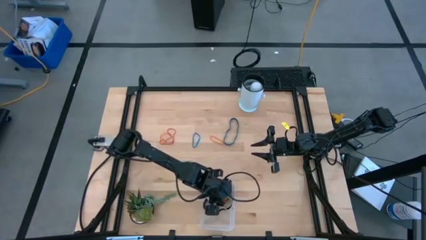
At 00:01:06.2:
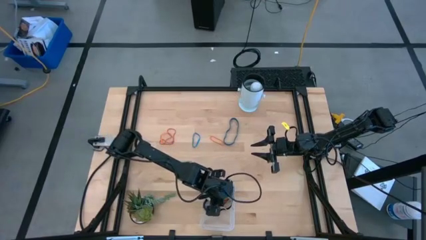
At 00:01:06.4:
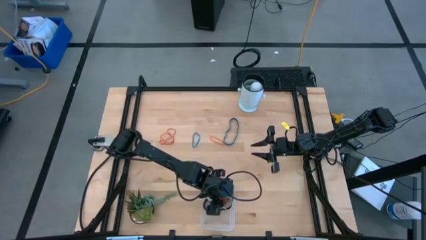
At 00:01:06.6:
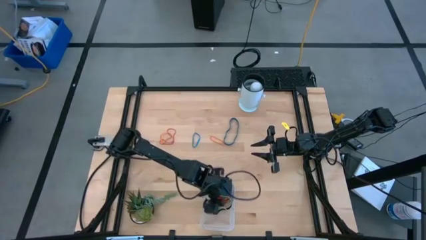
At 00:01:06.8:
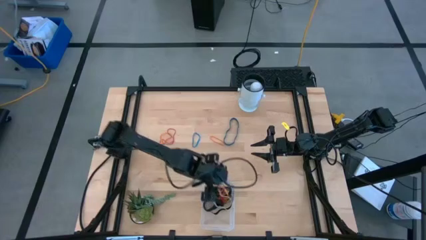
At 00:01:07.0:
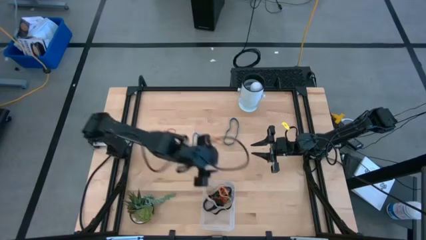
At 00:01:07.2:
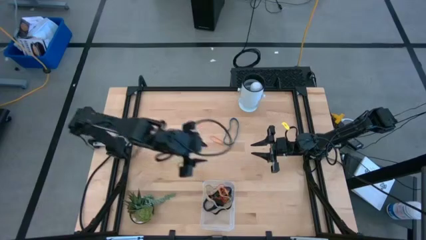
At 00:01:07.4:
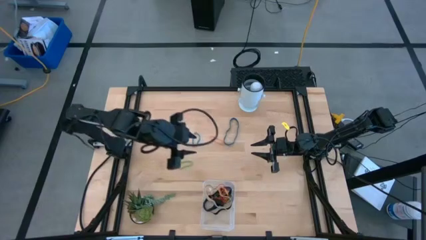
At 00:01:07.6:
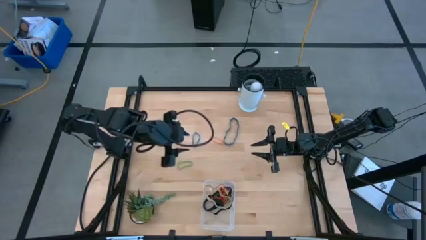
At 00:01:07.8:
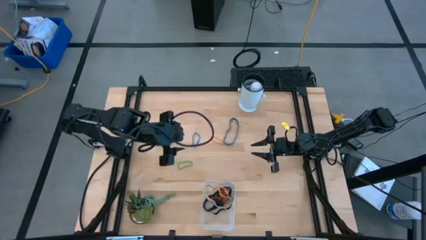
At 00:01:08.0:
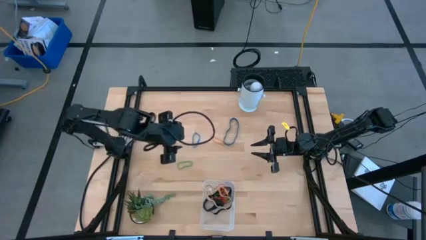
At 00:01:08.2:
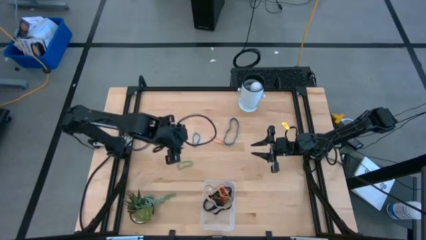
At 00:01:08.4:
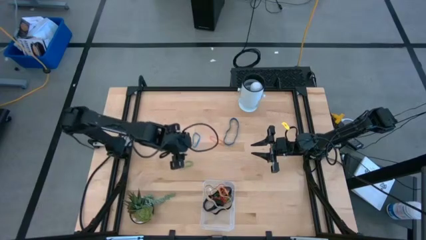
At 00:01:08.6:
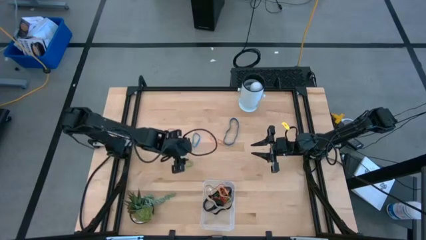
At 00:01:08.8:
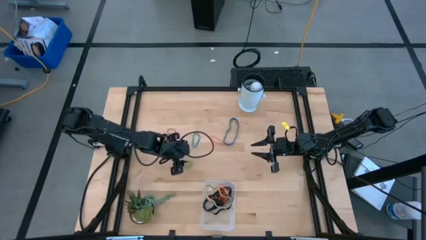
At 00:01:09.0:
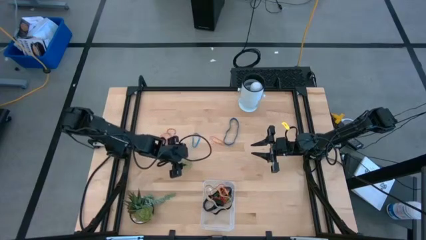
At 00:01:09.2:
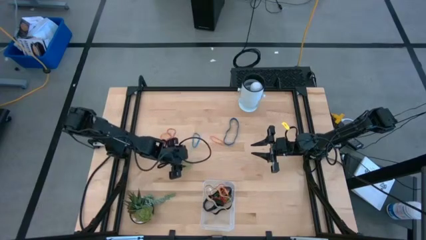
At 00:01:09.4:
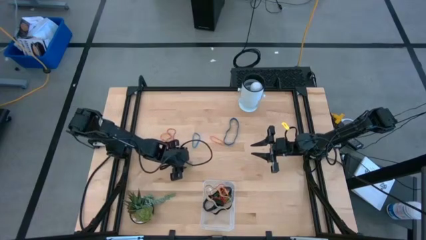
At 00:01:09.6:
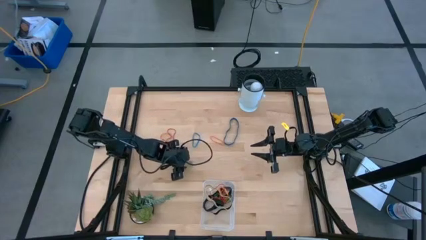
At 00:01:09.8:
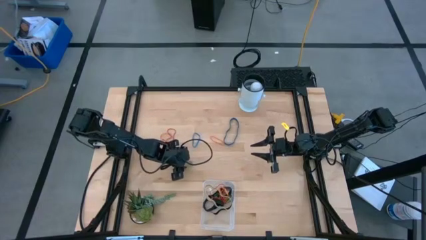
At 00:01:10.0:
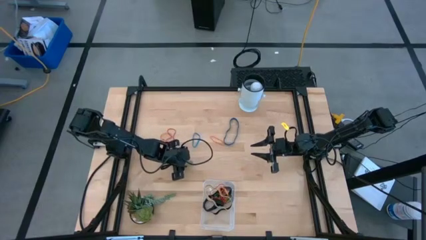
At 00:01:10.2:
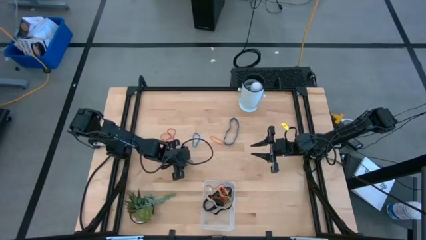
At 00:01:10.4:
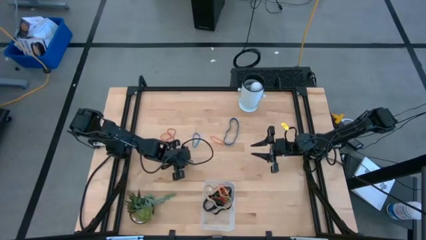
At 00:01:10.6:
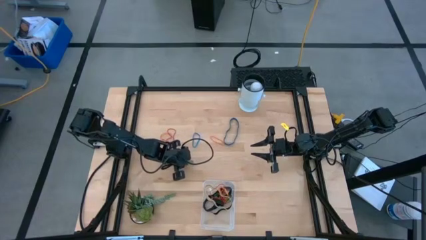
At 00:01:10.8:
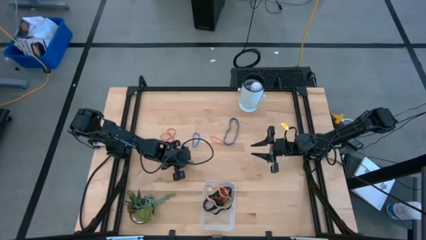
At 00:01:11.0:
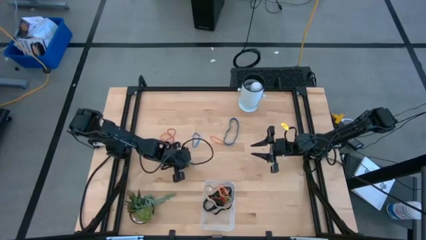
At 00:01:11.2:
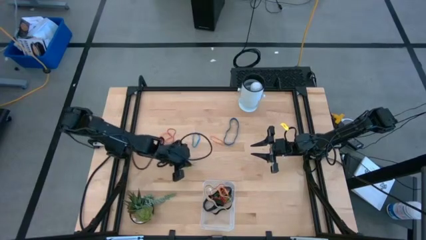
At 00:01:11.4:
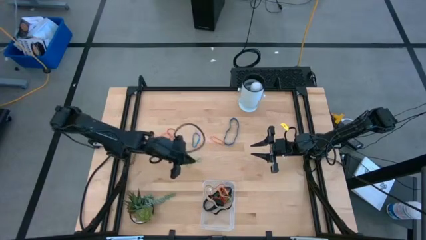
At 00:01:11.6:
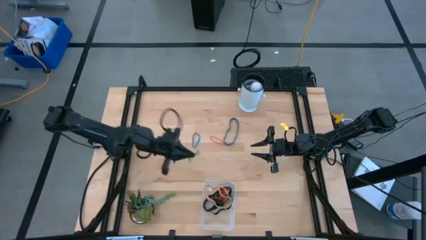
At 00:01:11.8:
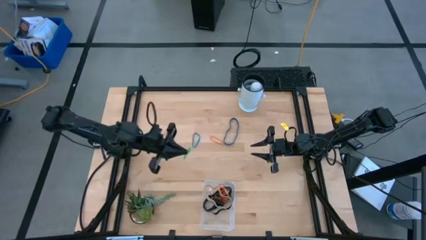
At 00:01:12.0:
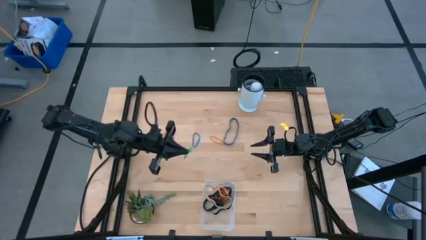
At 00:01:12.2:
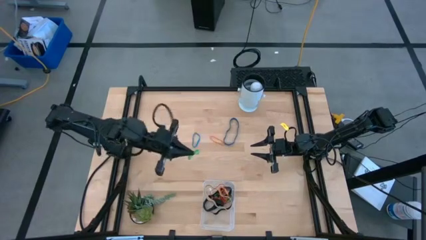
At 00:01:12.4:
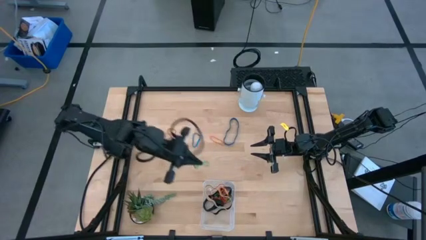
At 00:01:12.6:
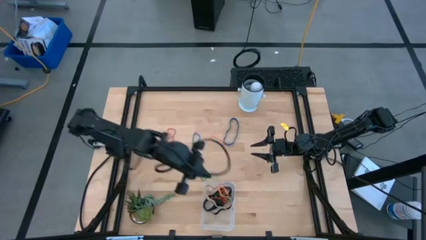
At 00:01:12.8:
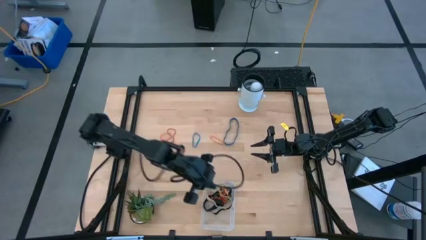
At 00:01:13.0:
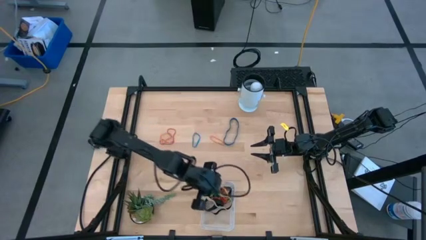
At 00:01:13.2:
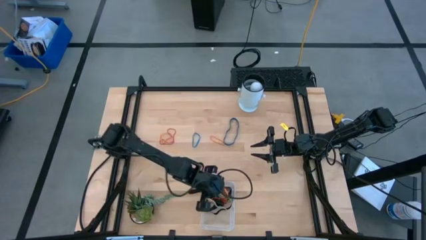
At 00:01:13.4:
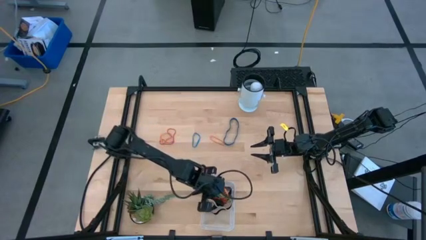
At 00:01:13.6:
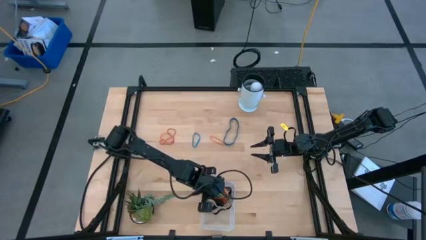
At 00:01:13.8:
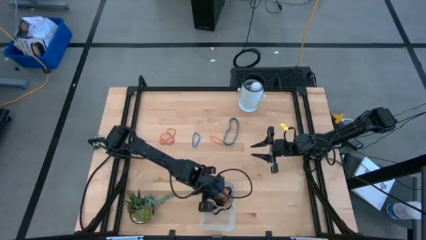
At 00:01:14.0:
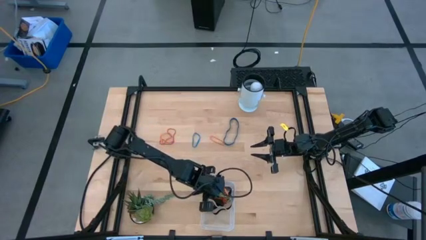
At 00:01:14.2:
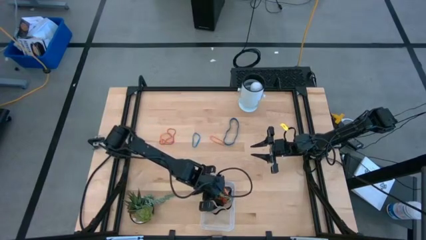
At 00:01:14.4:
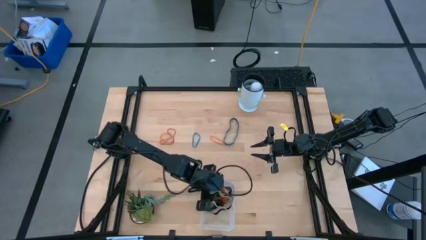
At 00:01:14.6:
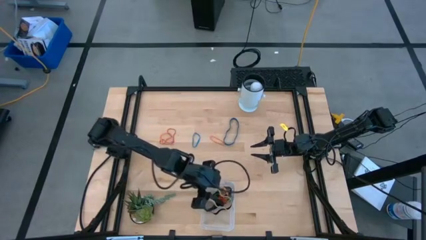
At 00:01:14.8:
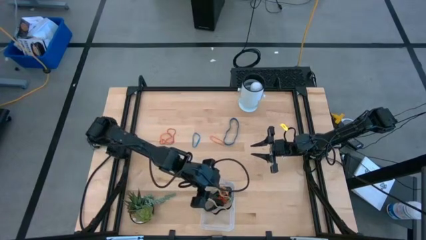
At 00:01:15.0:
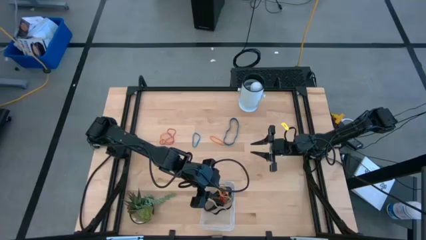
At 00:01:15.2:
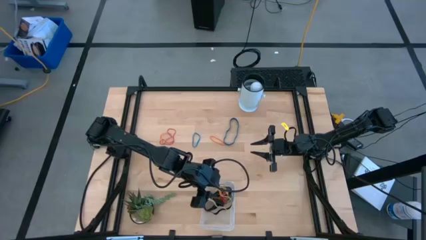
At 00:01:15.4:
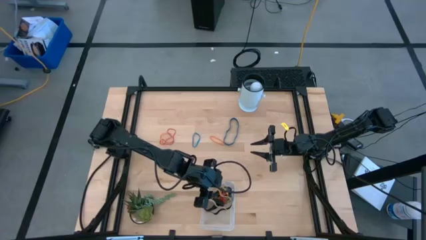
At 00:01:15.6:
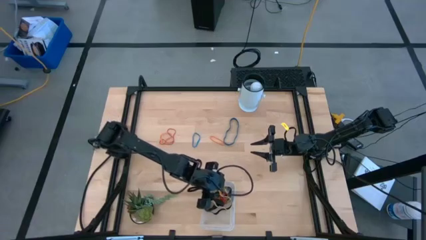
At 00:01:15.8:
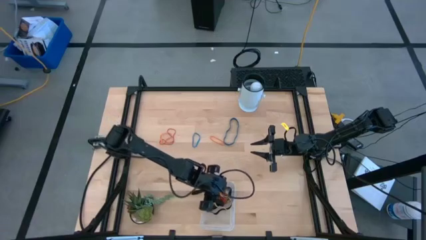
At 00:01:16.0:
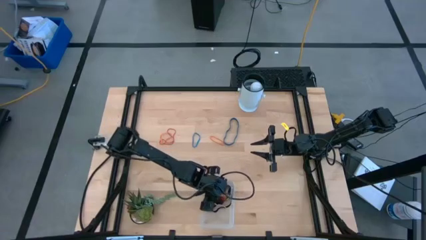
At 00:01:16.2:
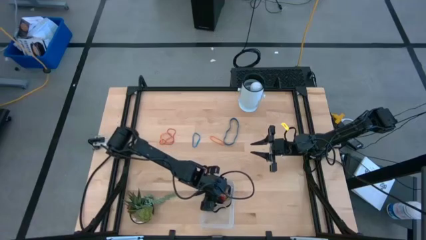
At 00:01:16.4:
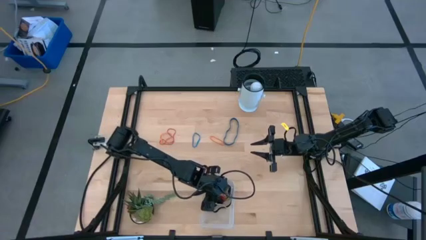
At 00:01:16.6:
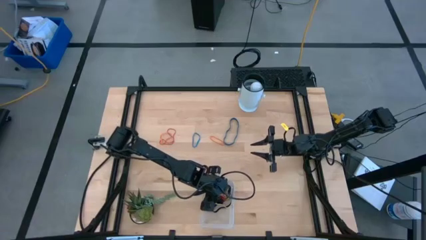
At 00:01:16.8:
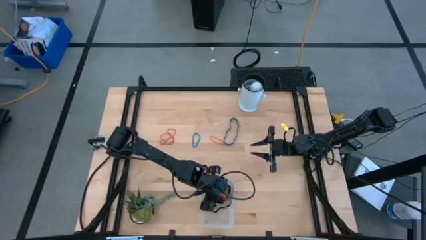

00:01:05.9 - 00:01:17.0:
Task: Pick and place rubber bands into bin
Put the green rubber band into the transparent bin

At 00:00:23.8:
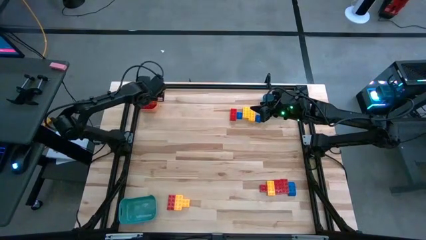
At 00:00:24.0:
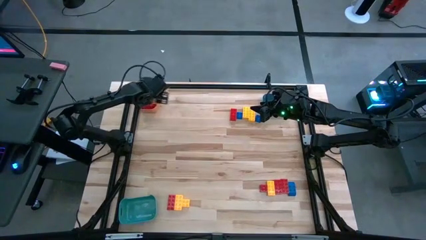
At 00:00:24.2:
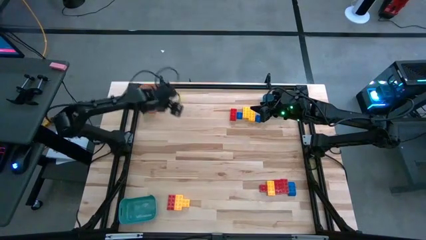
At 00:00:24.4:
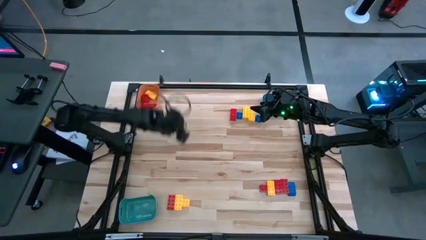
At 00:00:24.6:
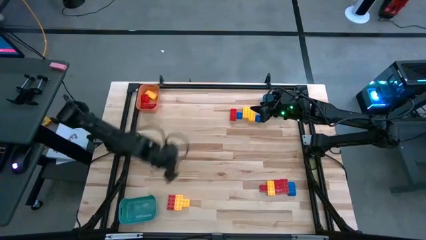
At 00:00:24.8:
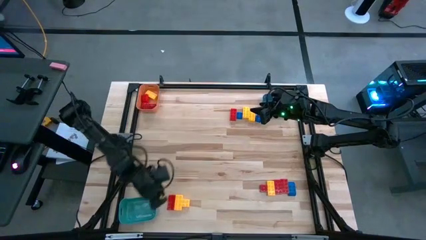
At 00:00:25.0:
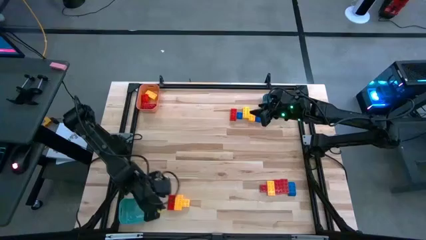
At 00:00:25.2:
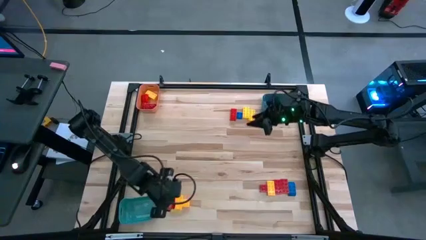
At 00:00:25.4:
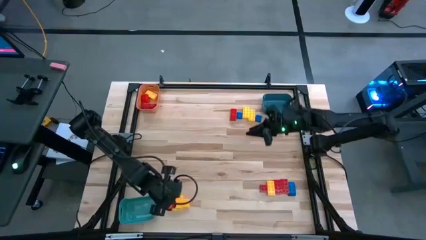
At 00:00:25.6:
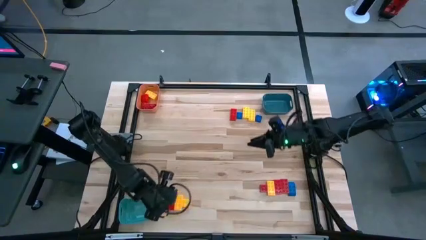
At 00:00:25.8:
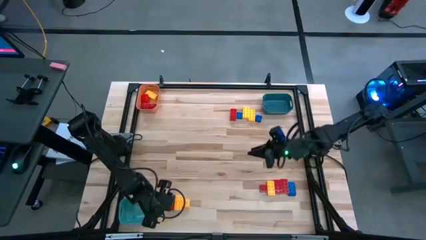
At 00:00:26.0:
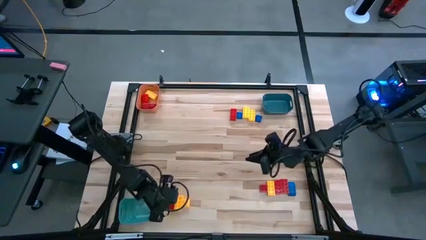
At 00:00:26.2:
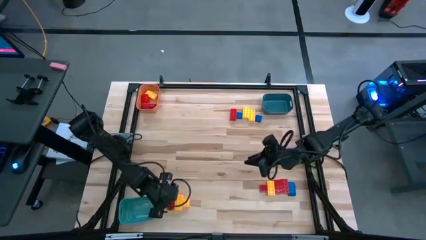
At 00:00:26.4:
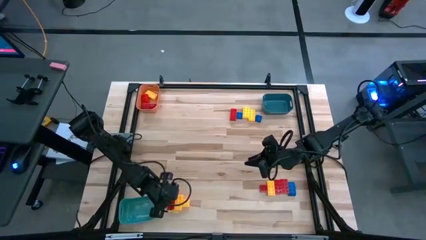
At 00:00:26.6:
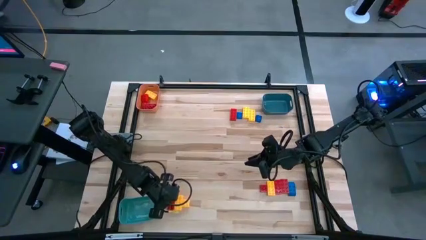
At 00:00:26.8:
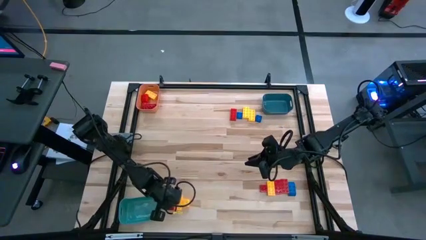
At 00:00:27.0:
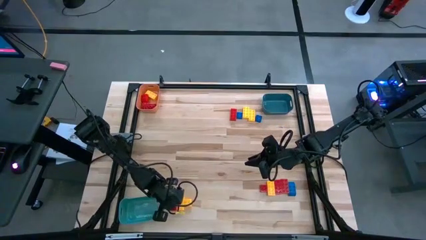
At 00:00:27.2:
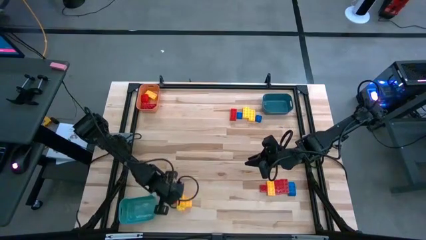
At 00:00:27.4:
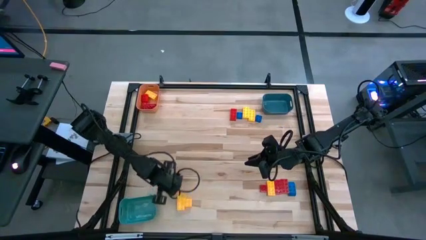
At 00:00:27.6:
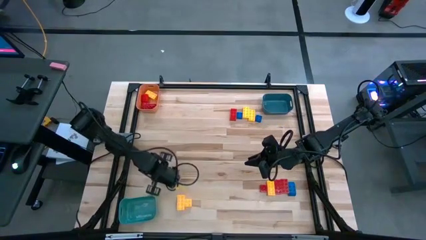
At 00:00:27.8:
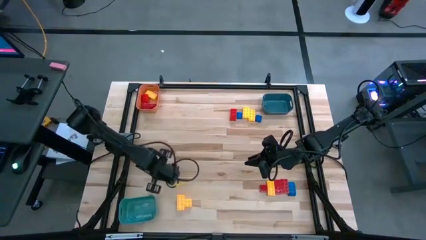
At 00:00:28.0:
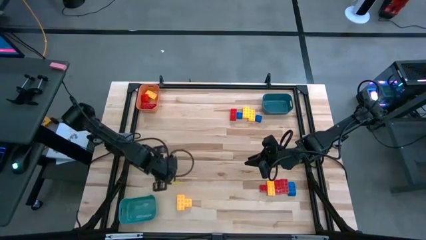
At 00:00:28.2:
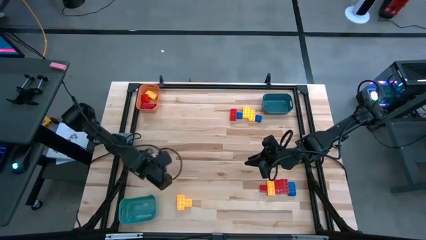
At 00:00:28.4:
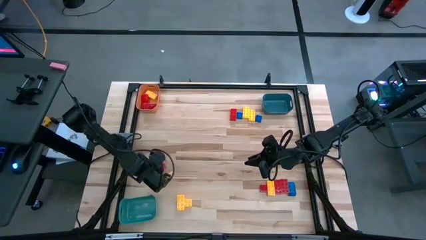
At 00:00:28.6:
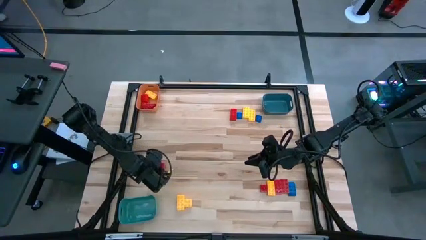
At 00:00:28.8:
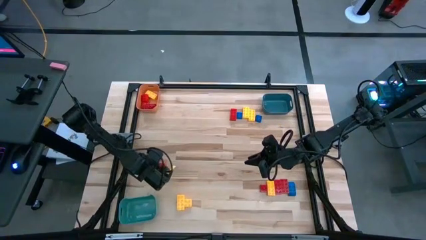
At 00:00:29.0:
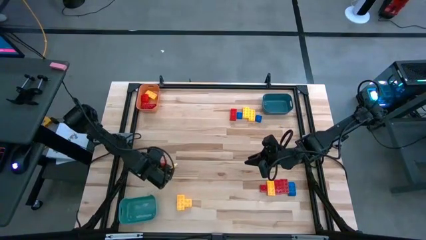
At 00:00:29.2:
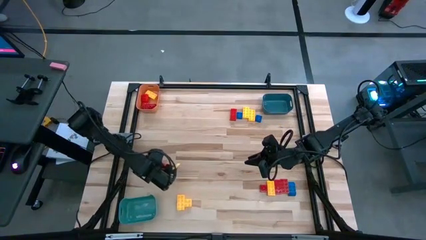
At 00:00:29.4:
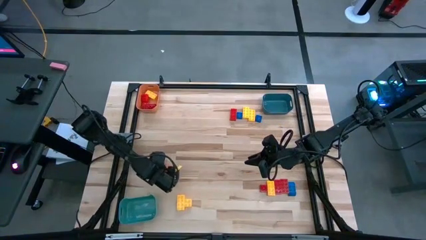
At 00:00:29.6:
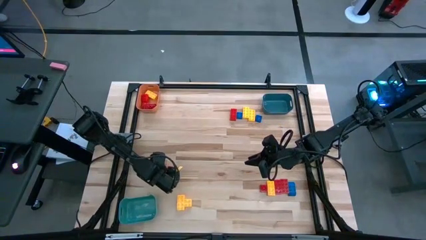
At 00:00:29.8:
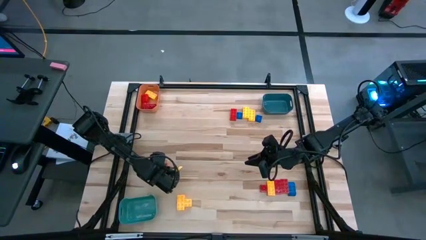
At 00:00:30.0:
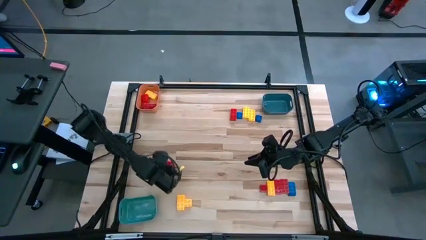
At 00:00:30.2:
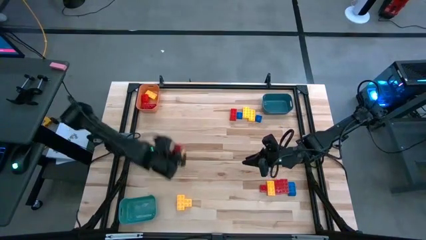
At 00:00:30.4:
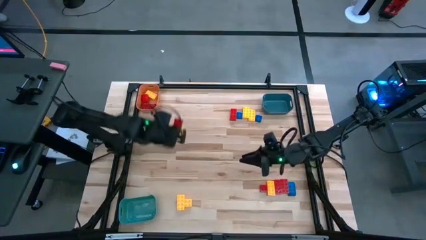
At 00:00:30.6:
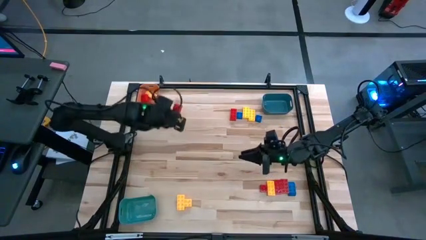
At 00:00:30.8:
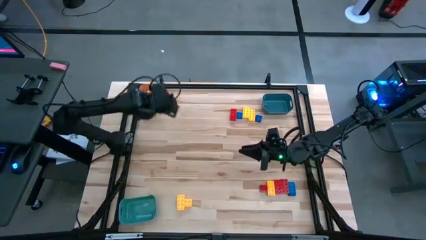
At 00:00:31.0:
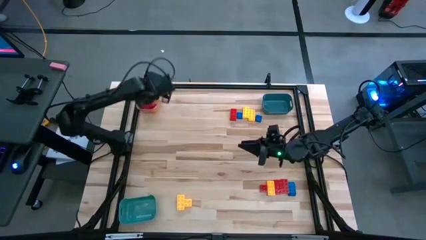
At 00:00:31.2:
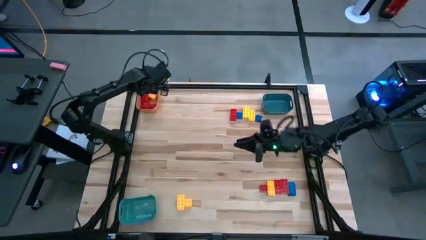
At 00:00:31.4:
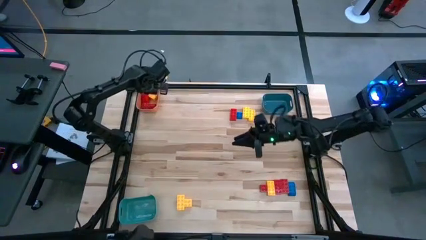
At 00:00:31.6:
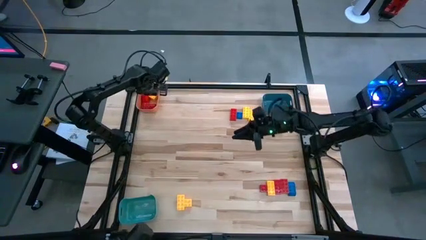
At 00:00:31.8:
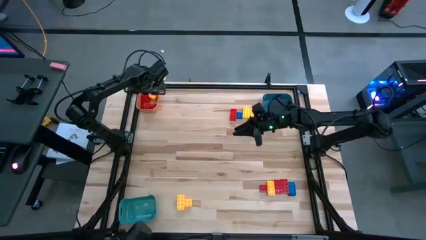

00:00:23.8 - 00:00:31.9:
Task: Sort blocks
Put the red game piece into the orange bin
